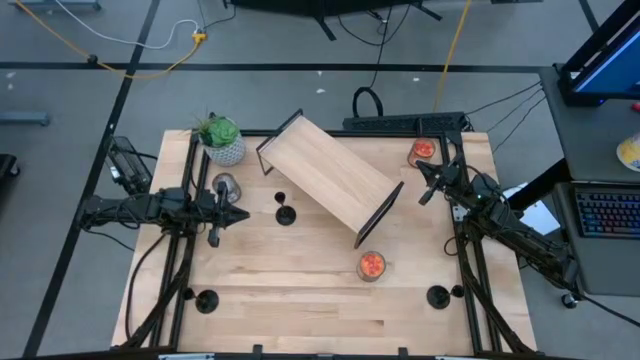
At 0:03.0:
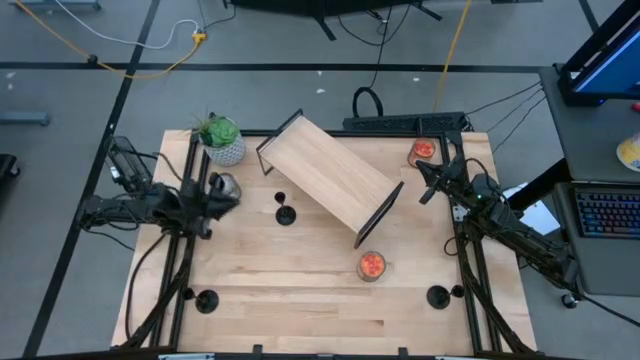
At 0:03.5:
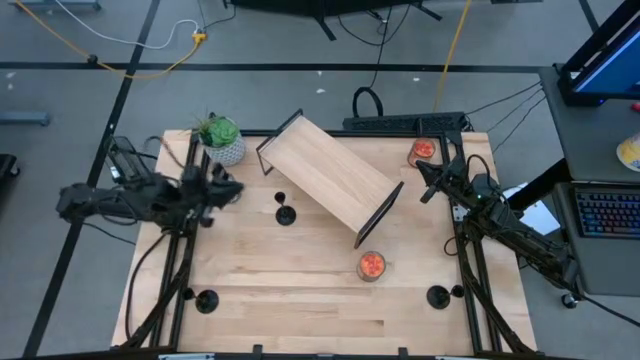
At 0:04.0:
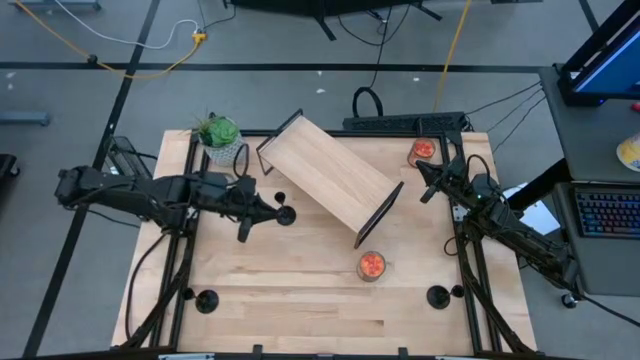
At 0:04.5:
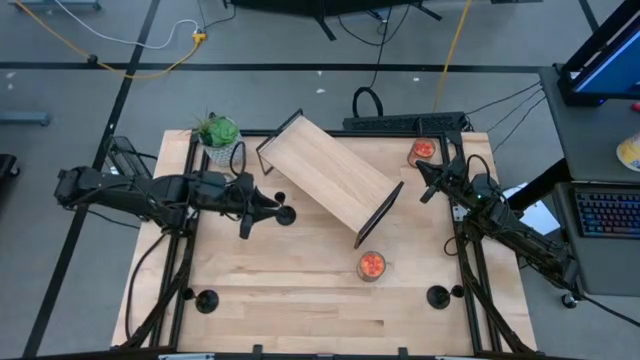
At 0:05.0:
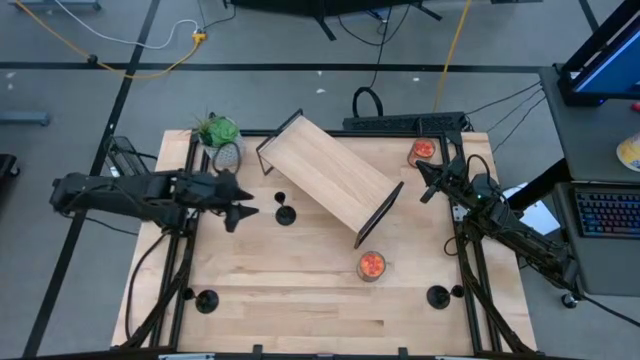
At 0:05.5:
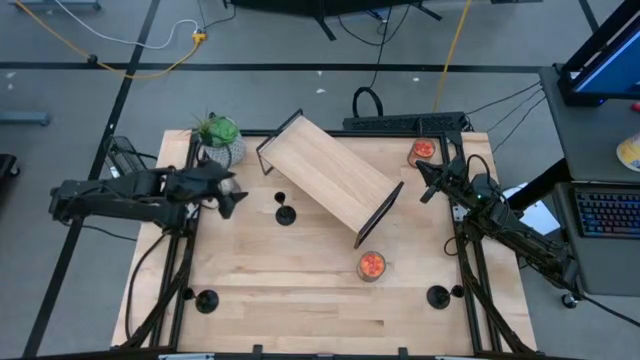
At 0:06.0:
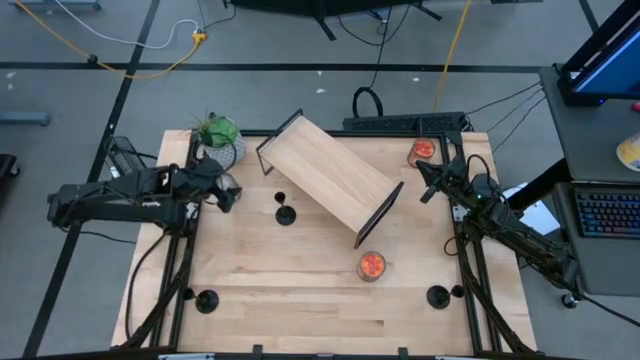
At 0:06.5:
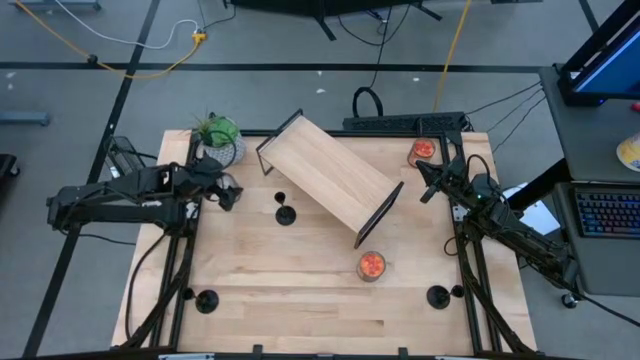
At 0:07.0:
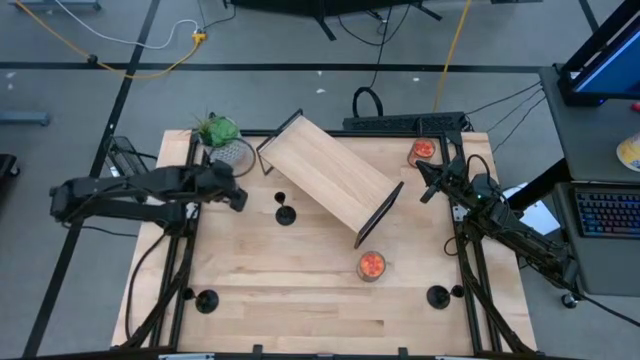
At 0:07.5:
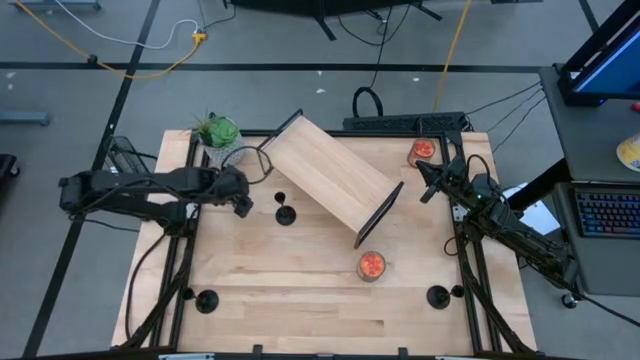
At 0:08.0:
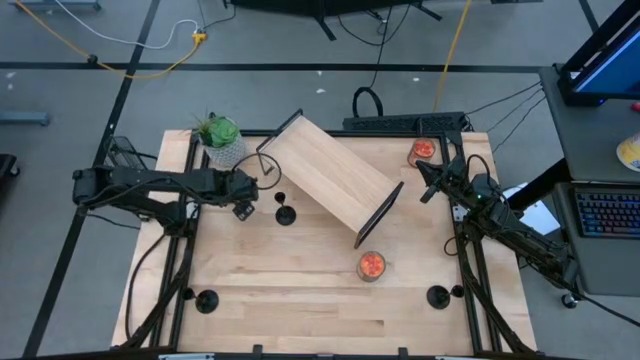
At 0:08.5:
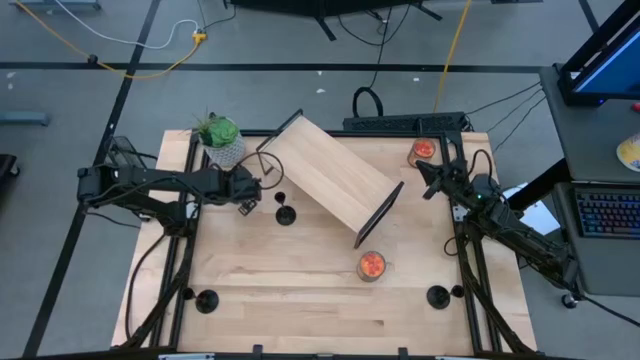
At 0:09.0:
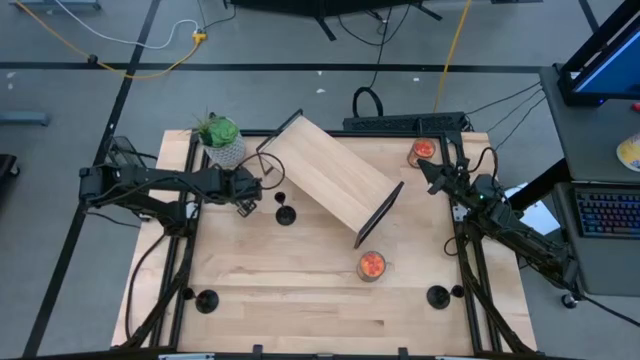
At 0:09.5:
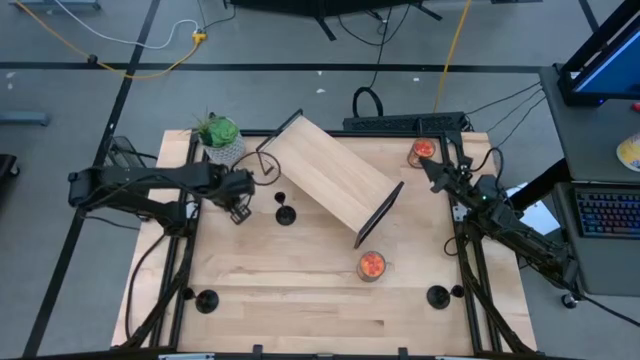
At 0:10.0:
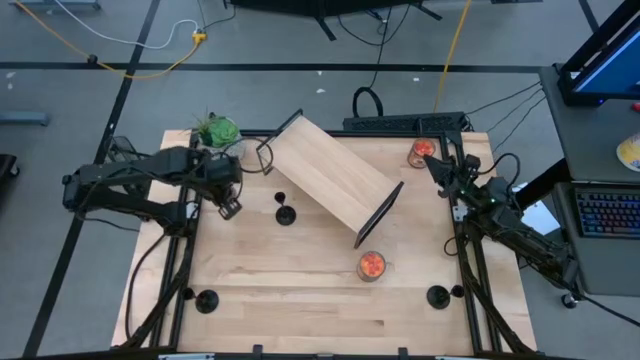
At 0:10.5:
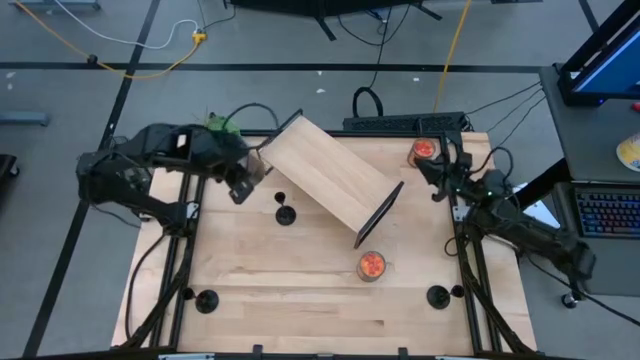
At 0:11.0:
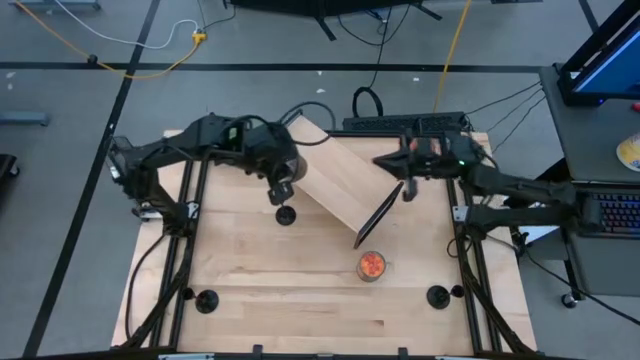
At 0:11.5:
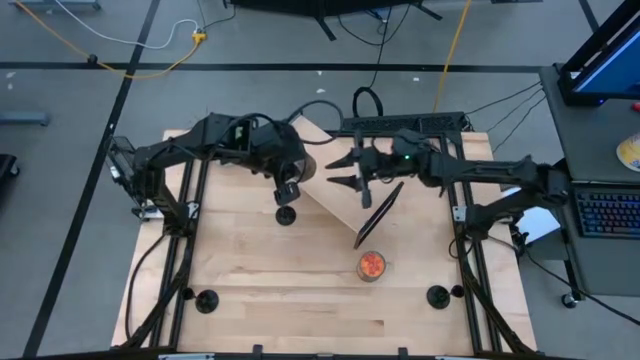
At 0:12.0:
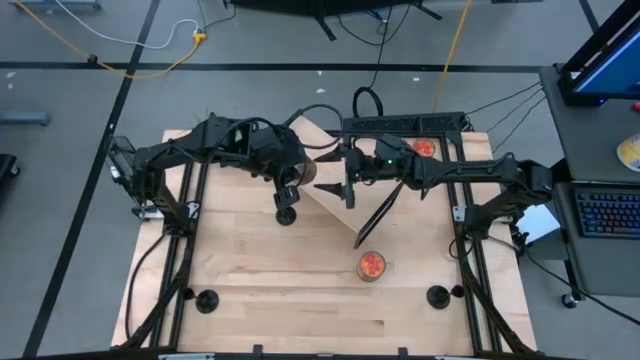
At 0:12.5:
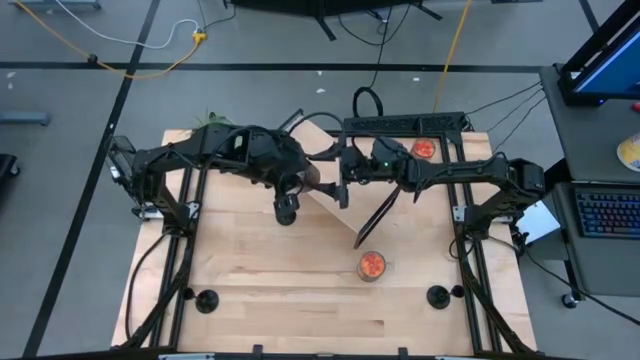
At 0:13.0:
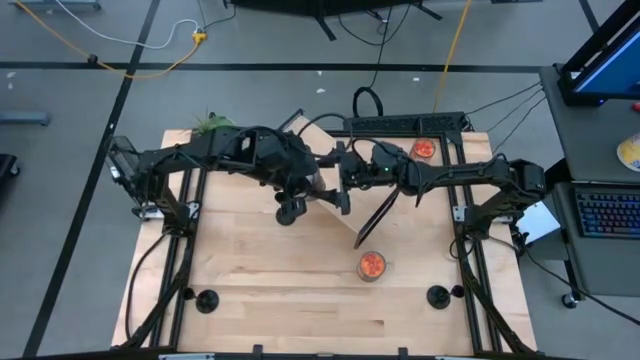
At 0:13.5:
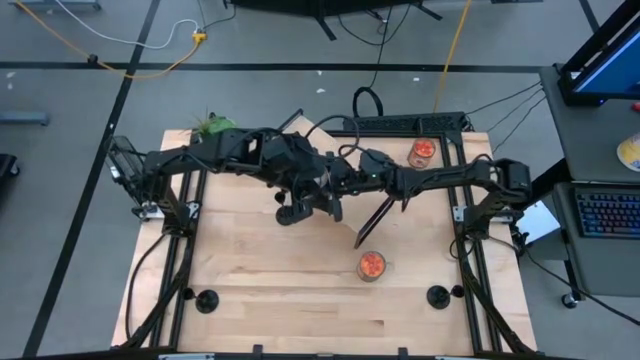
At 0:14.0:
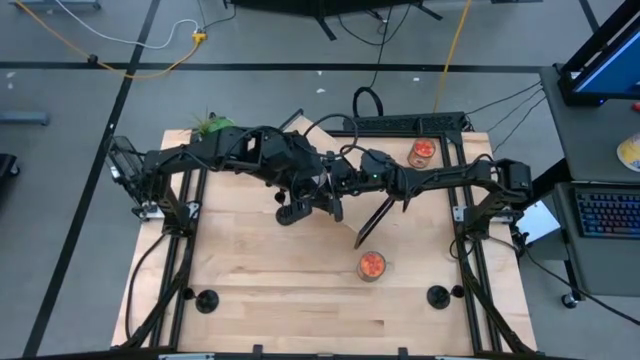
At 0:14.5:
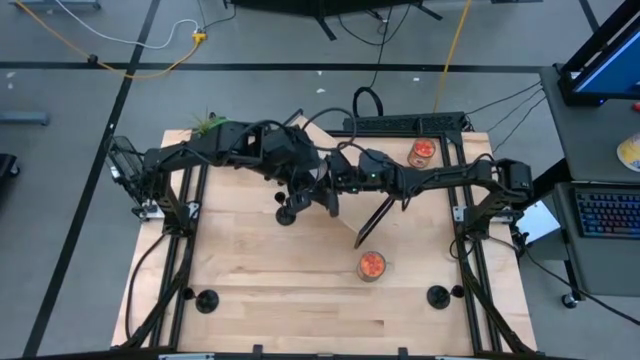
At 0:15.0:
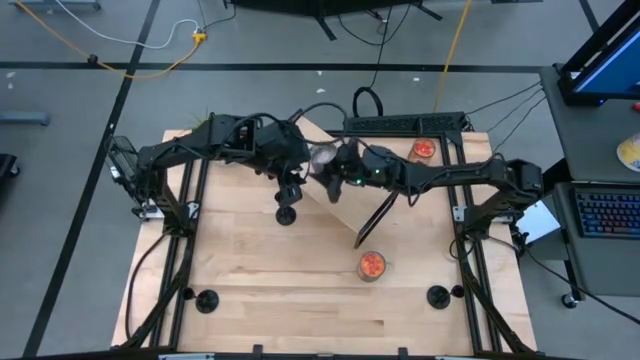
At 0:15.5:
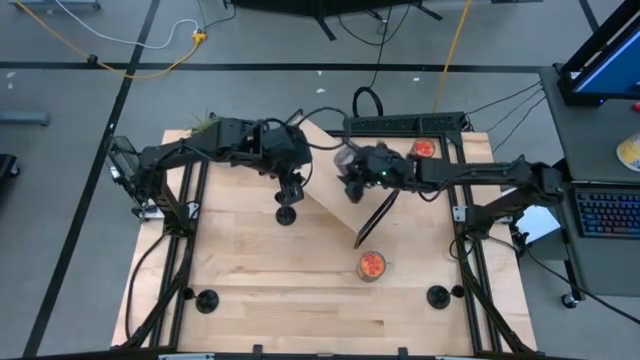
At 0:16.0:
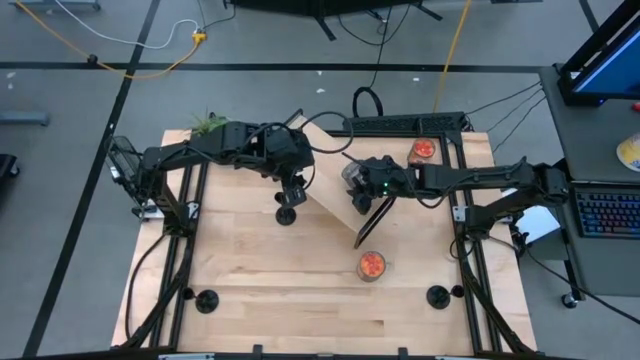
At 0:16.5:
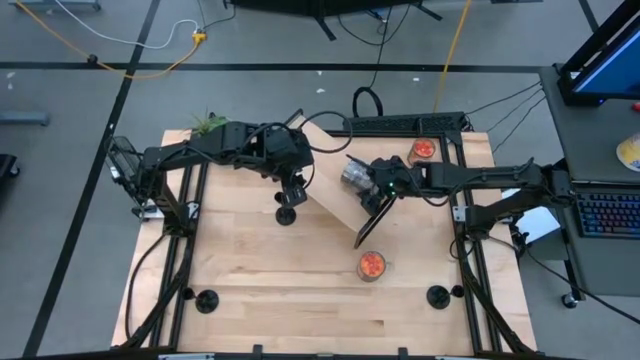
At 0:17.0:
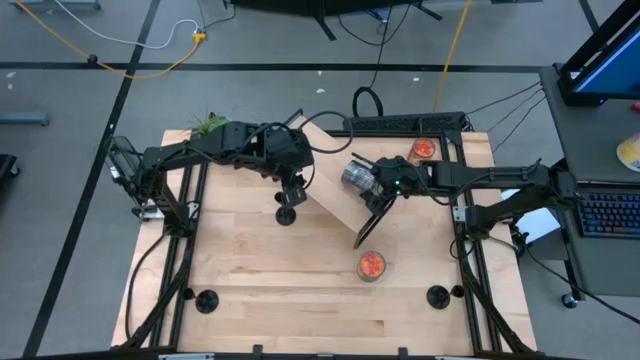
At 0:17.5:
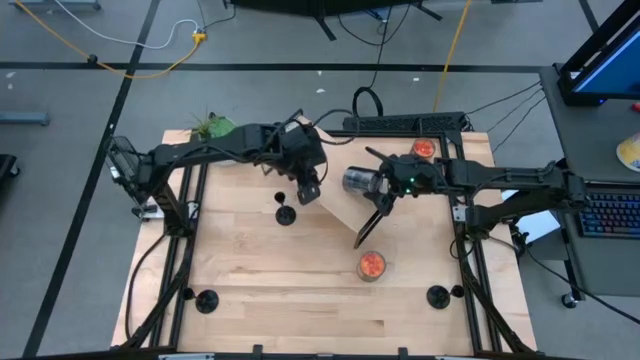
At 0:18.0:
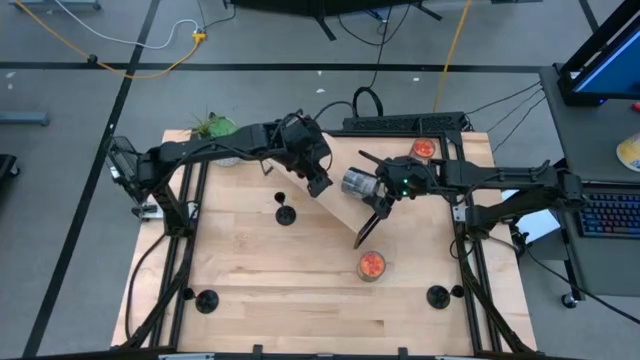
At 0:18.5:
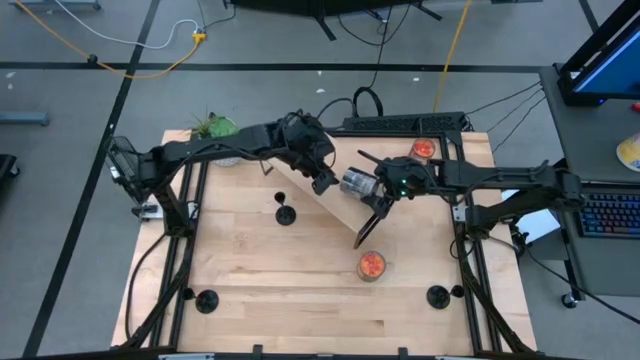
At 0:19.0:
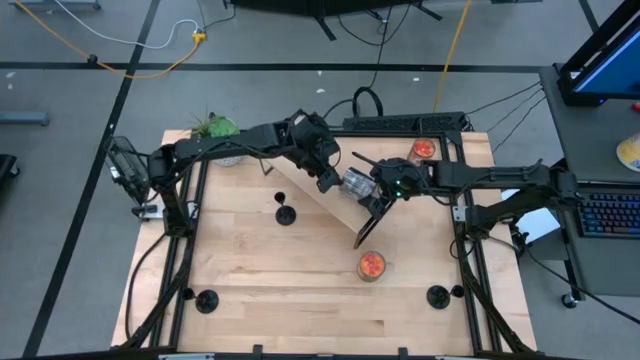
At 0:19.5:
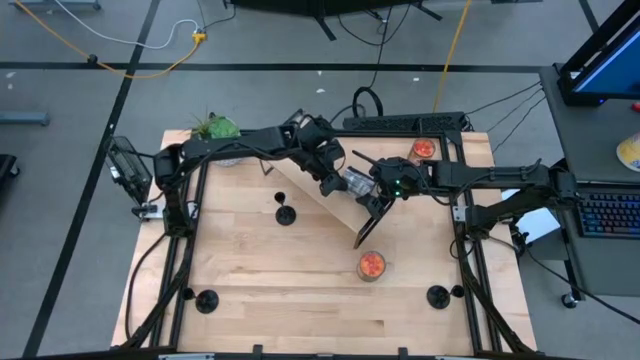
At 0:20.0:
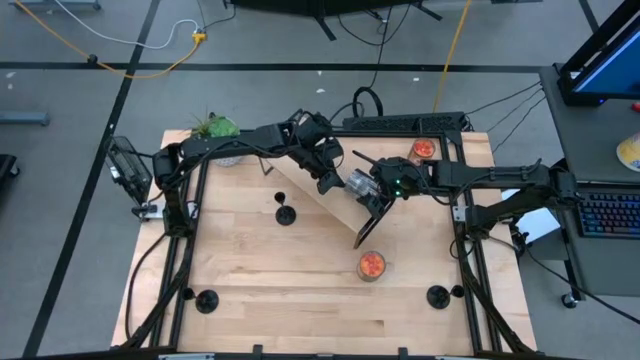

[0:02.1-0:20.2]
Task: Pick & Place candle stick holders
Put the brown scented candle on the shelf

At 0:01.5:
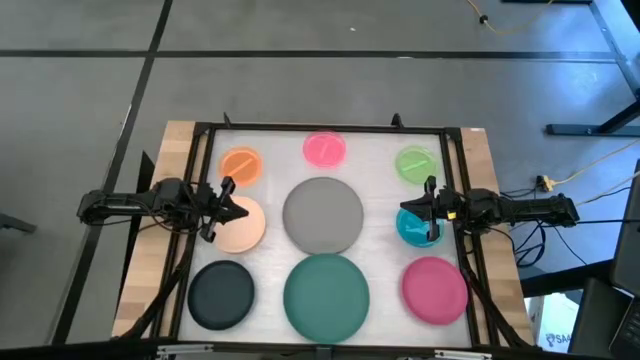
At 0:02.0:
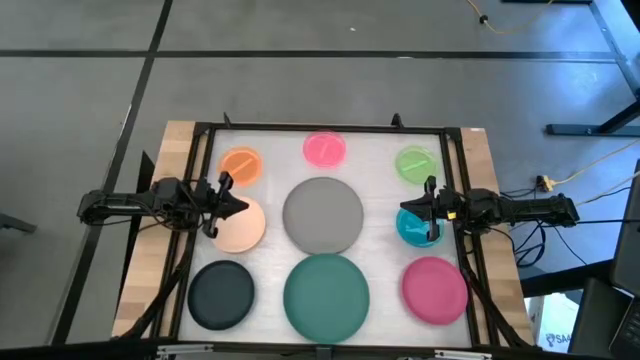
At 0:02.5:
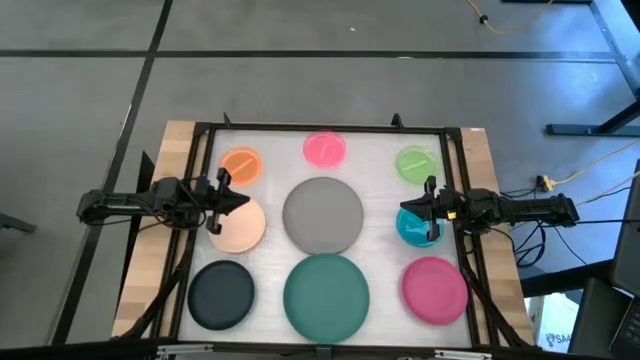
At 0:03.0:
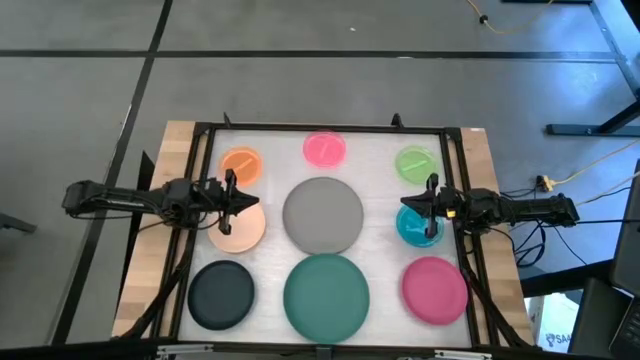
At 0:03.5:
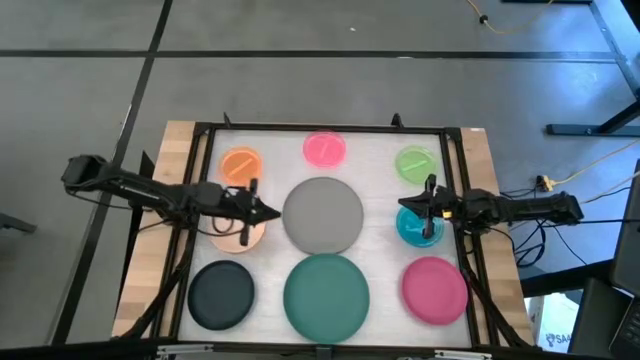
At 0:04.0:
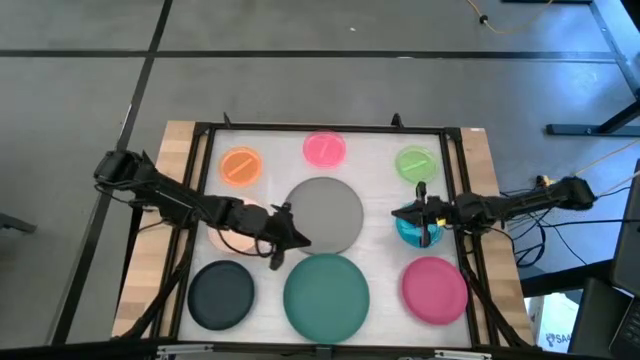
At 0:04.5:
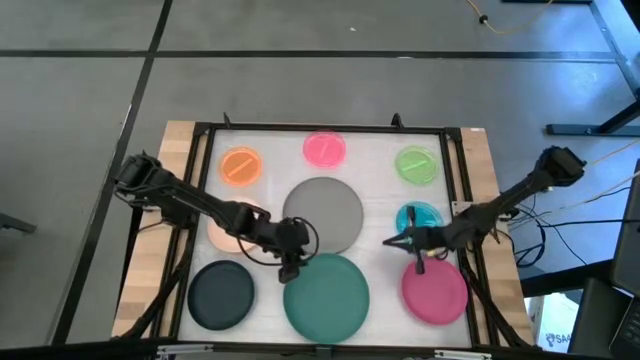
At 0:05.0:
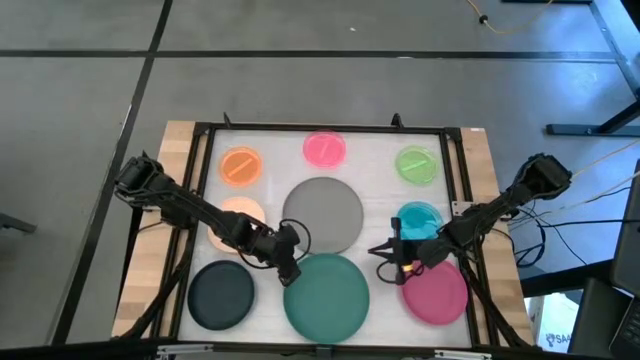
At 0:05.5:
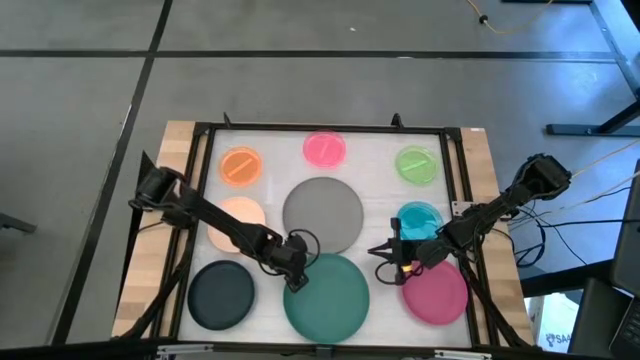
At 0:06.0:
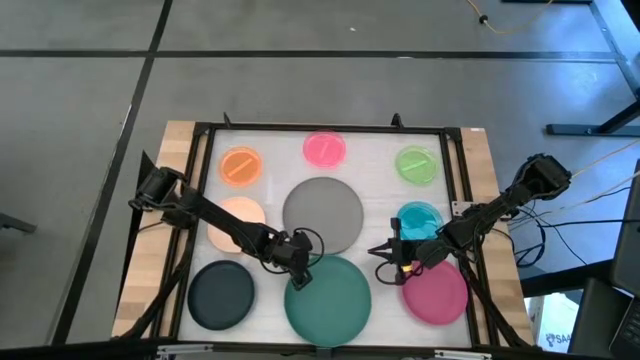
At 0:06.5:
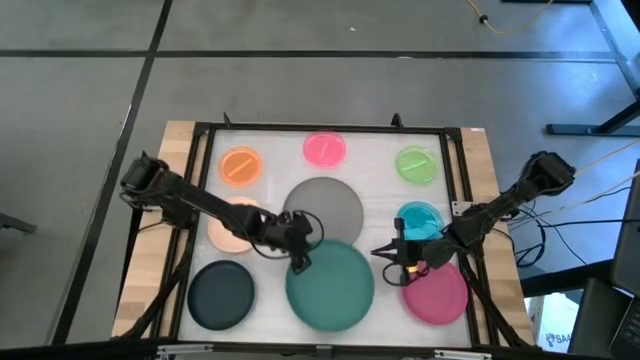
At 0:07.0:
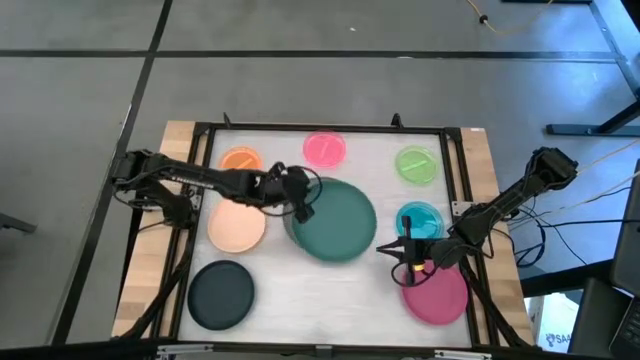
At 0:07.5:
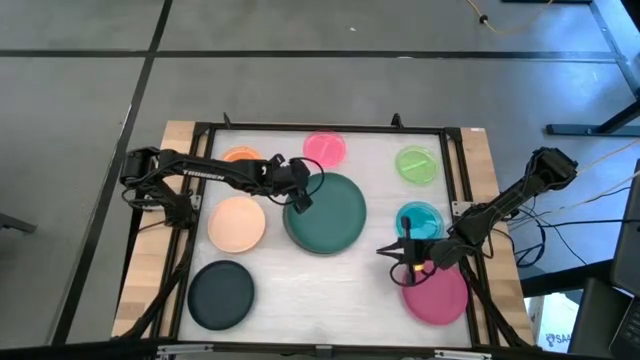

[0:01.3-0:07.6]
Task: Stack plastic plates
Stack the big green plate on top of the big gray plate
